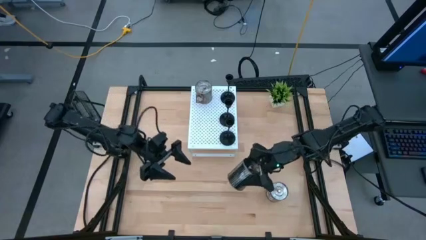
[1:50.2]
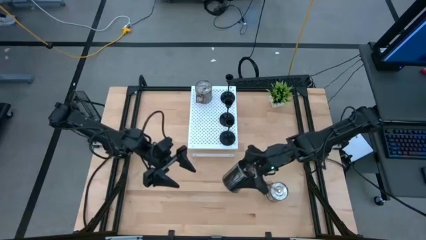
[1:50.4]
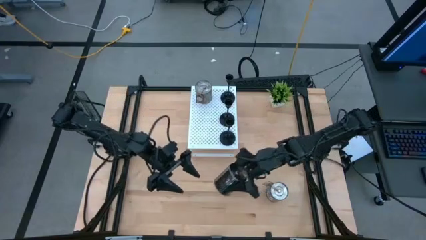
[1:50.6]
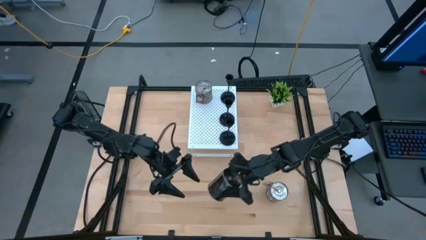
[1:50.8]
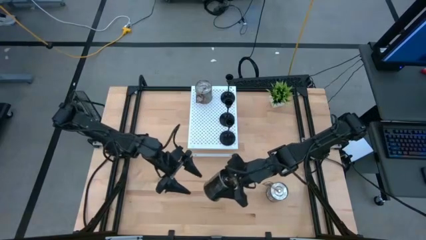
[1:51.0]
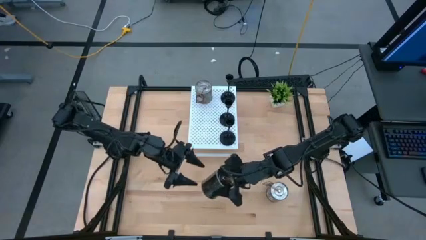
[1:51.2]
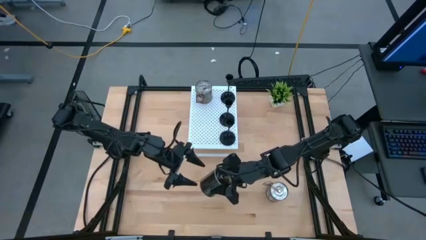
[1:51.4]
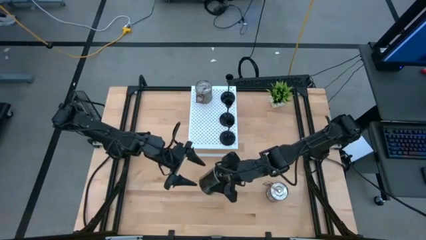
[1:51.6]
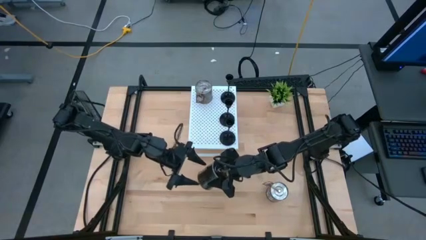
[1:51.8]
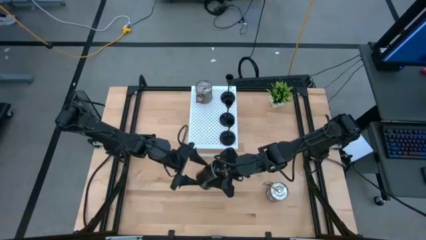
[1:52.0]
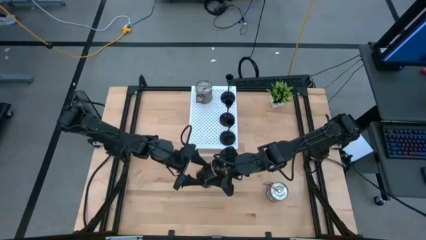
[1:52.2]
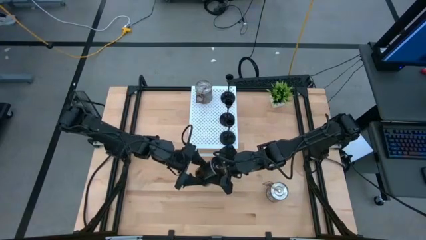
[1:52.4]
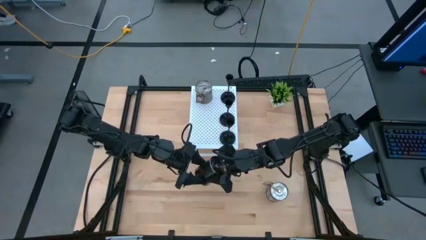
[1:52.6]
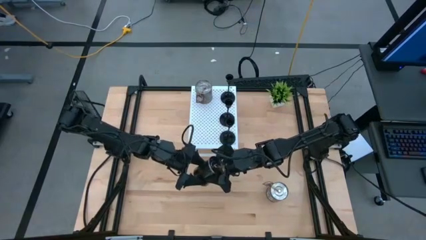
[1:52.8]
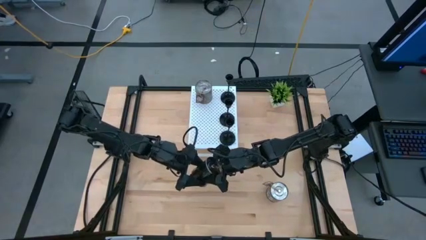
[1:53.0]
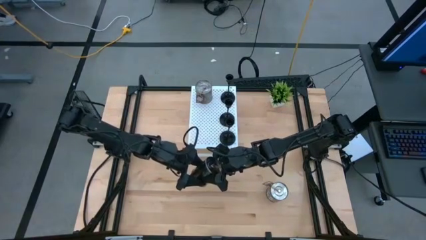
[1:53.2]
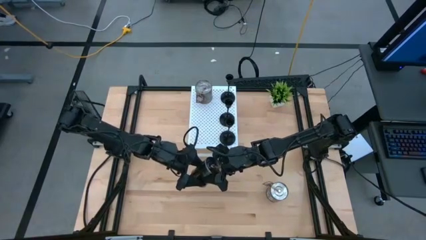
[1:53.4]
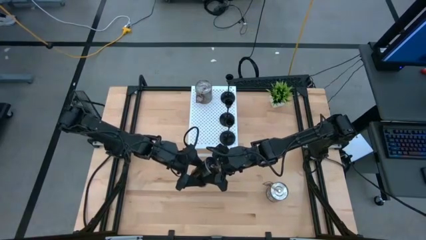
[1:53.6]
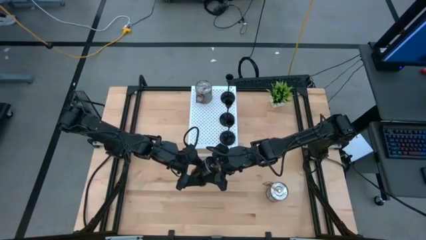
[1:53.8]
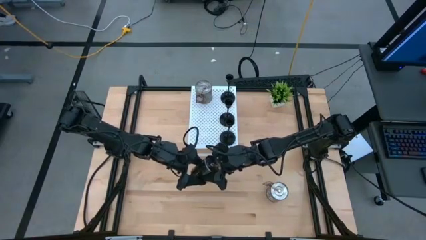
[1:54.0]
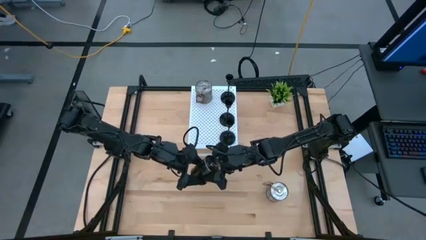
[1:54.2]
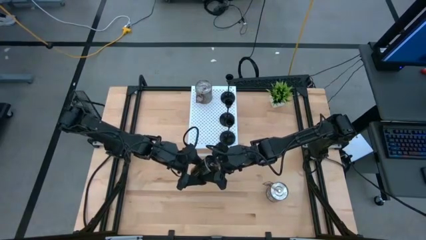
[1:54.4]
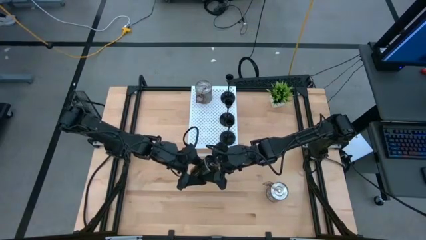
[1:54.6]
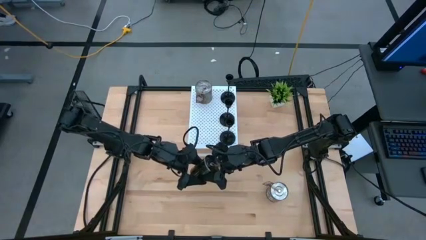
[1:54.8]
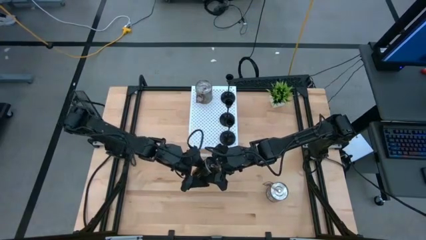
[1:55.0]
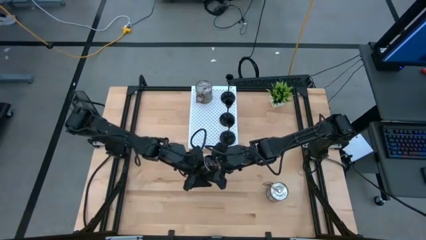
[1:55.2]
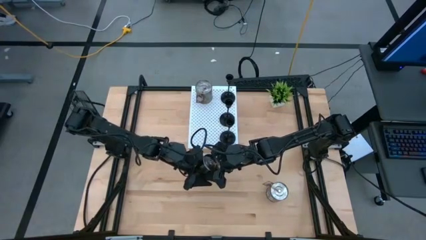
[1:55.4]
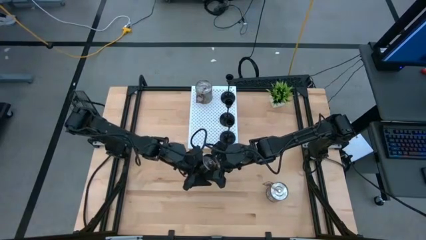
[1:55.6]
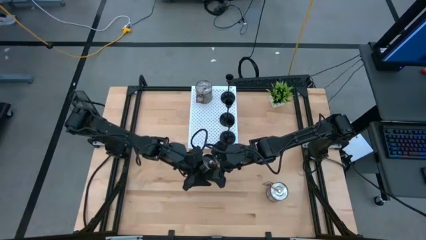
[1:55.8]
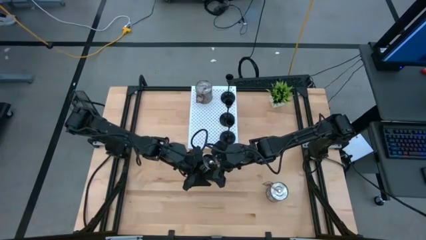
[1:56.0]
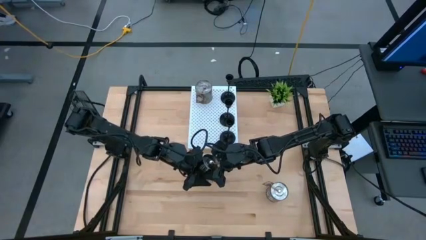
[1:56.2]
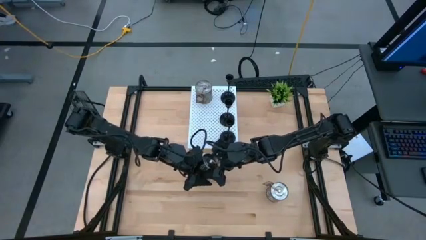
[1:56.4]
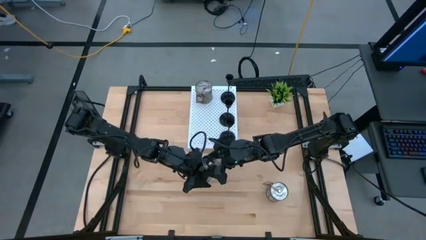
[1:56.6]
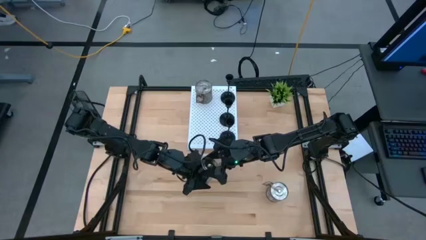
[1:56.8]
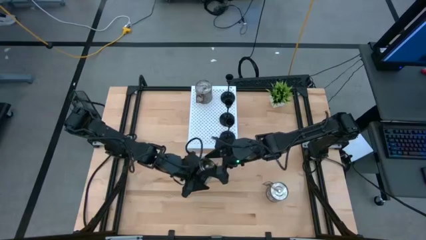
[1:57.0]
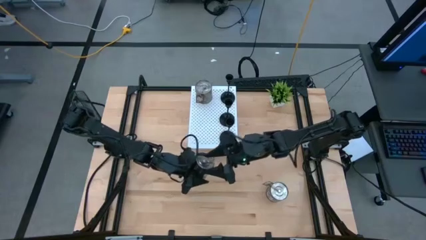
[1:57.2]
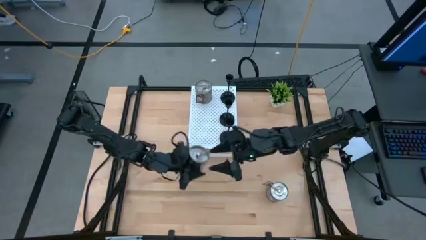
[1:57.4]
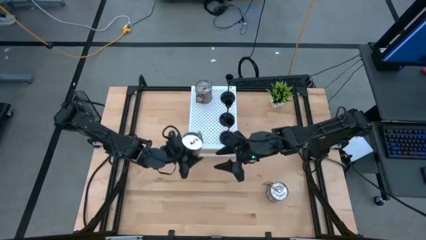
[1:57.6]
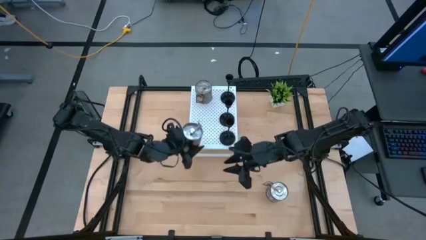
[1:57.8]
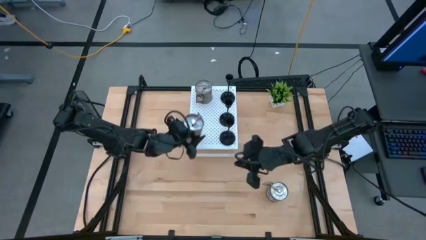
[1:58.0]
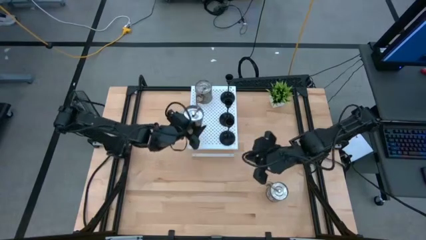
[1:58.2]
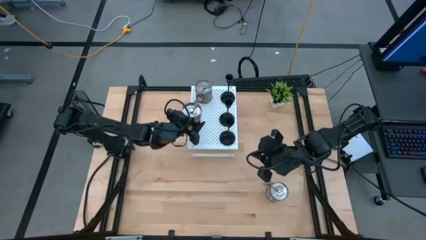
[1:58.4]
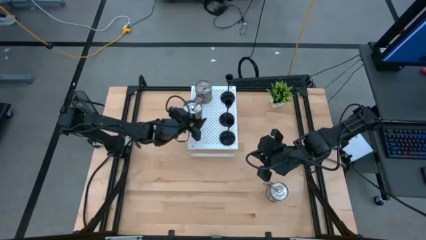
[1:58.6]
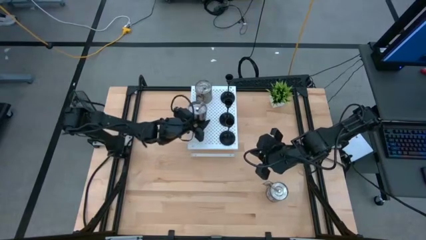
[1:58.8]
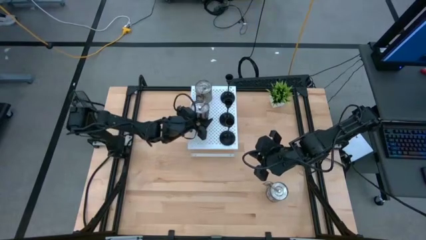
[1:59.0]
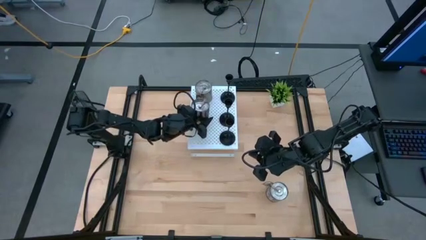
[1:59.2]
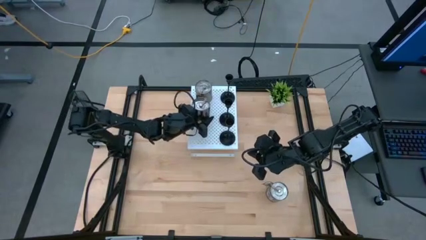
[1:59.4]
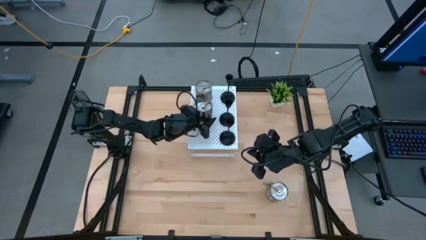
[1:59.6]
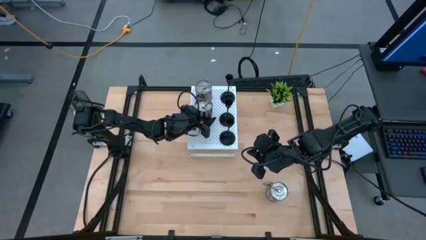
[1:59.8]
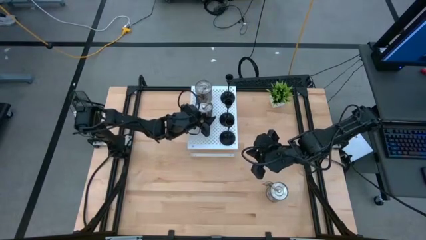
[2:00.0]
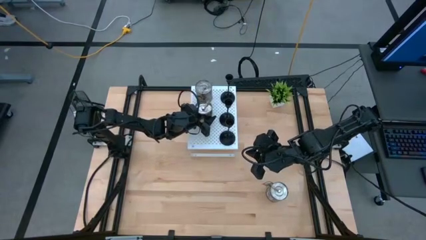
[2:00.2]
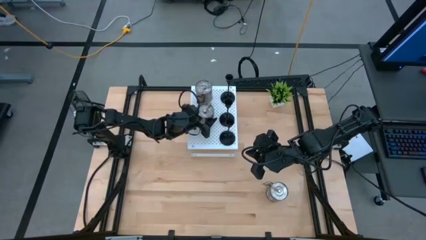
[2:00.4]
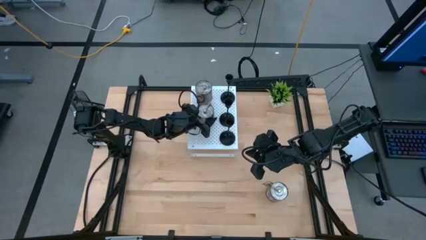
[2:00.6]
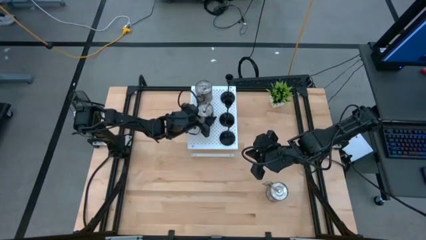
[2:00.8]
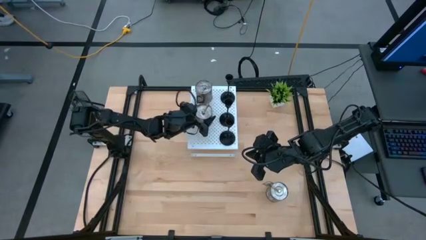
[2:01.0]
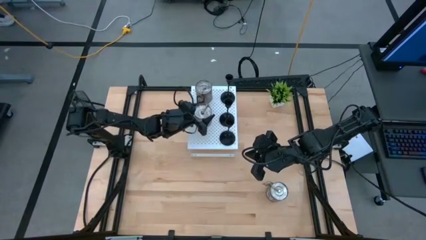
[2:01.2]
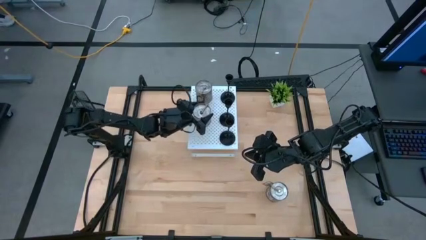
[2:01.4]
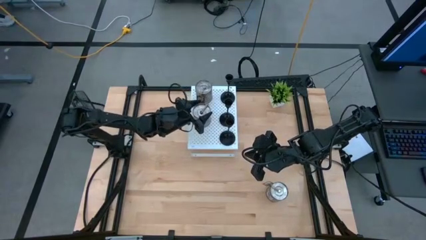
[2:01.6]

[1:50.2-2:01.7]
Task: Pick & Place candle stick holders
Put the top brown scented candle on the shelf aligned with the brown scented candle

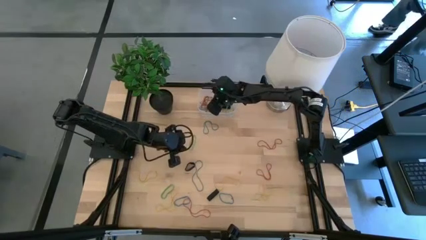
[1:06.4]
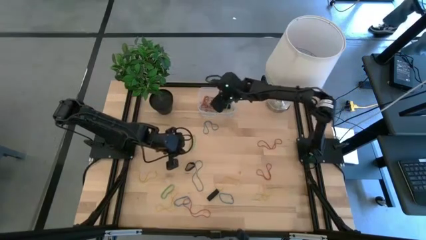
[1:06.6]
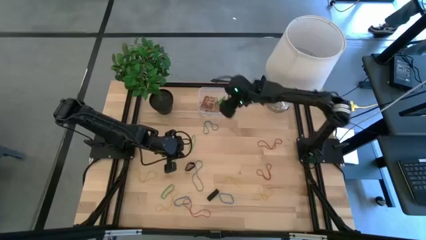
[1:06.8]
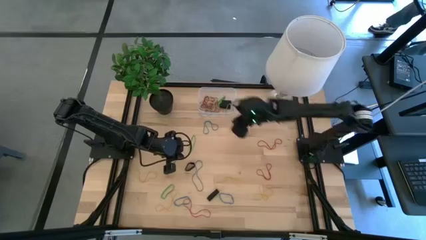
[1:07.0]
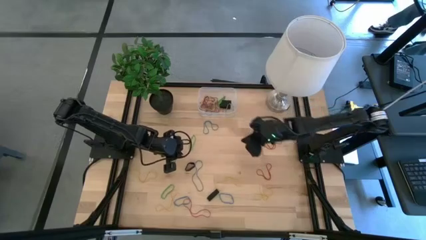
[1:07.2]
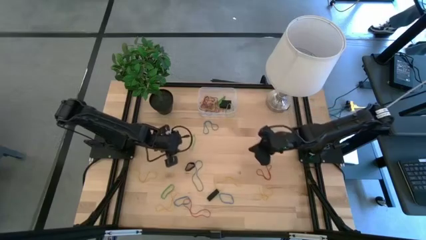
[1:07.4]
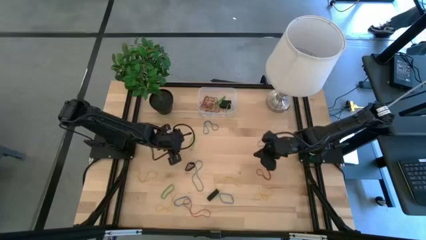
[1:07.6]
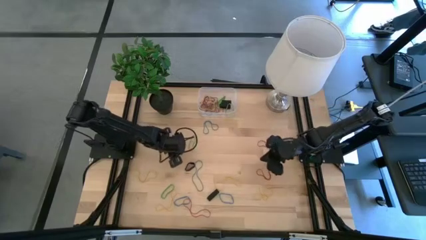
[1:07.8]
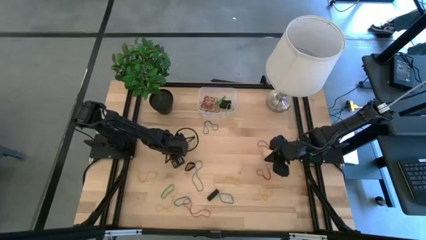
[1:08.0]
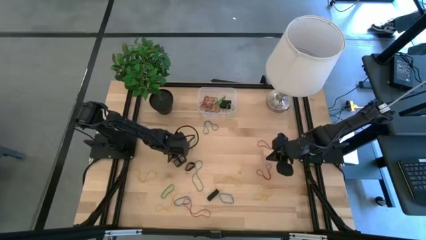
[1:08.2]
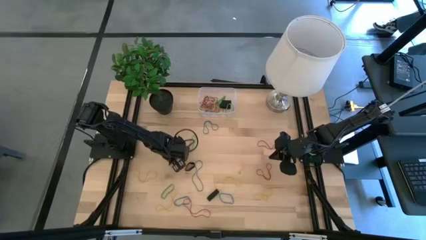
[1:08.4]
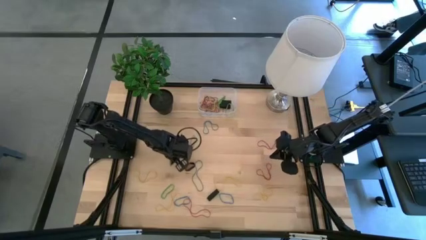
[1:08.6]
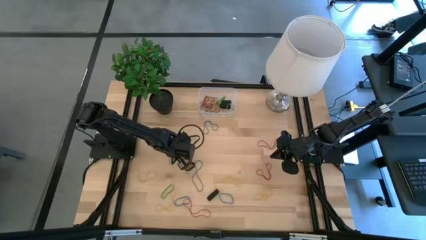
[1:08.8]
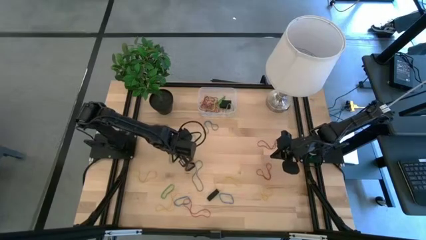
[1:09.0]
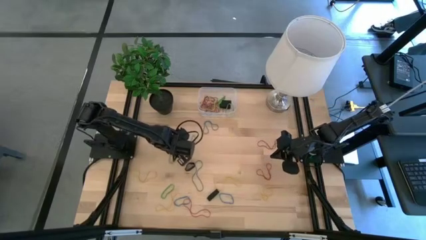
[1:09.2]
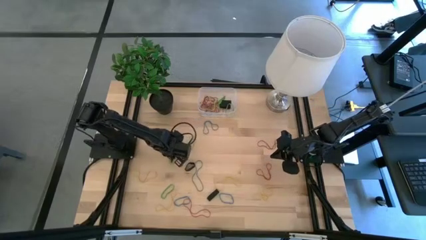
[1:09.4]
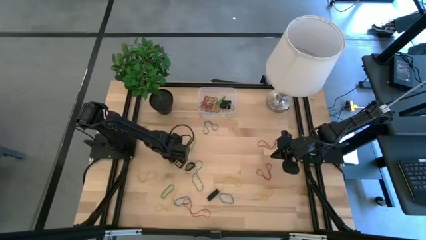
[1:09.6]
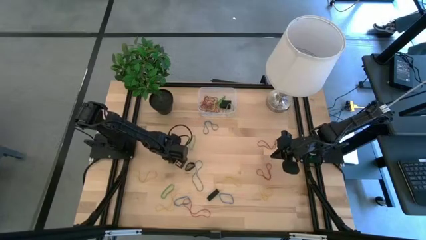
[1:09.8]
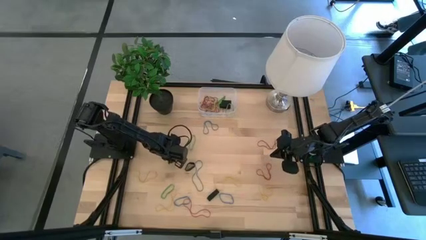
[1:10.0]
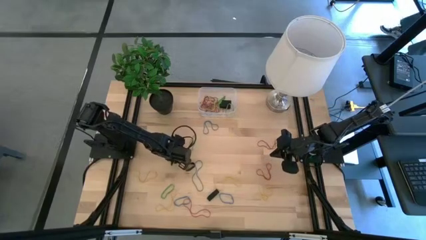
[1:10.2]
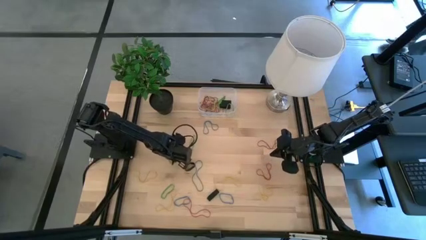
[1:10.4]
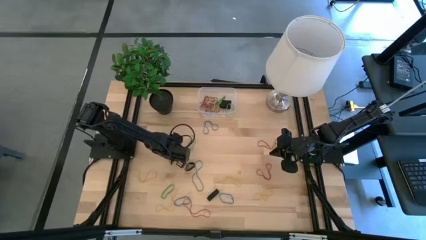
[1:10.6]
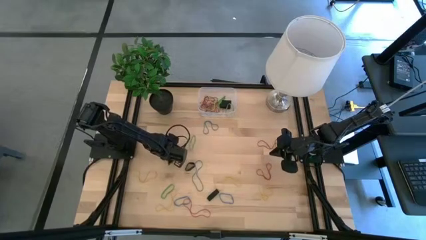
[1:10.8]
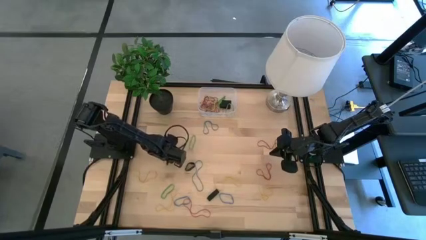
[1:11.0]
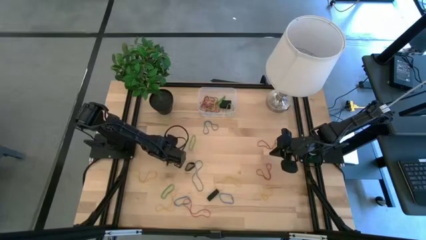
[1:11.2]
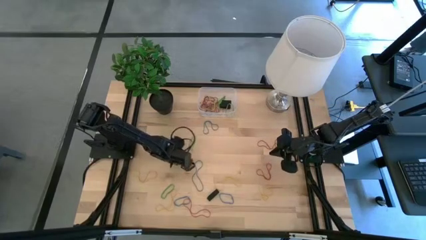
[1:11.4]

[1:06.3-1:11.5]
Task: Pick and place rubber bands into bin
Put the green rubber band into the transparent bin

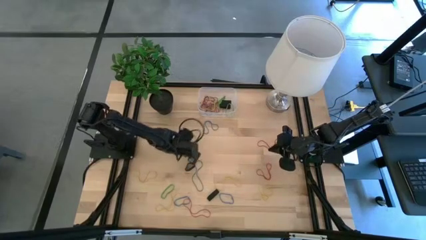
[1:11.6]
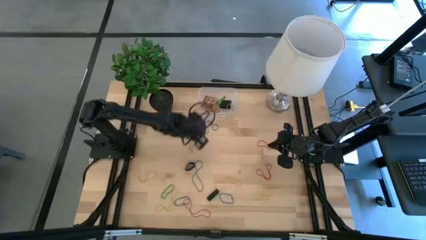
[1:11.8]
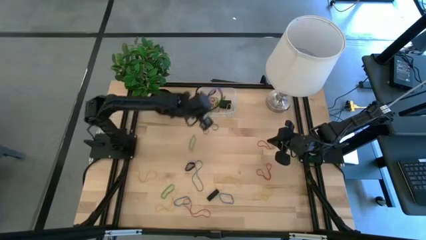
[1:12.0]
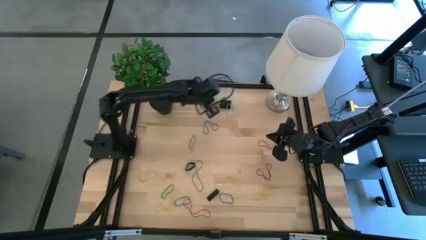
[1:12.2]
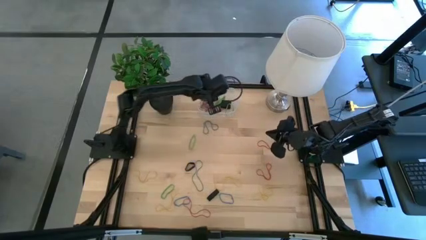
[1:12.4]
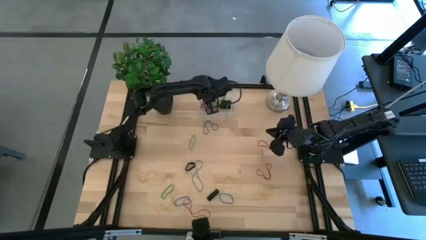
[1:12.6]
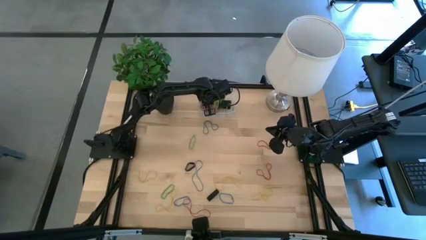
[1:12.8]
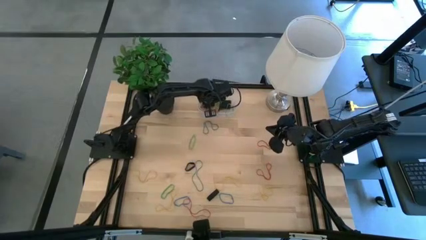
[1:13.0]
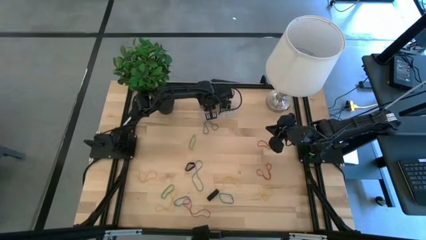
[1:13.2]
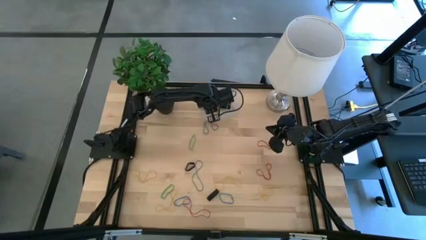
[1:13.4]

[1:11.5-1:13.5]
Put the green rubber band into the transparent bin
